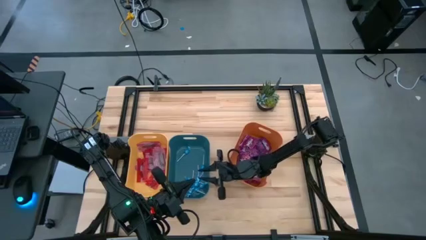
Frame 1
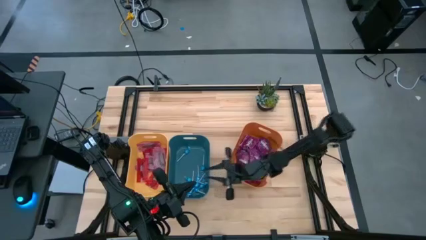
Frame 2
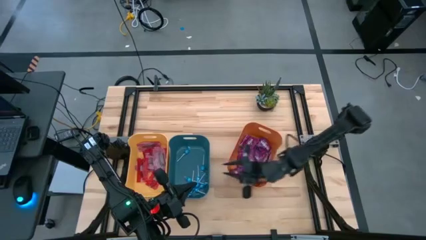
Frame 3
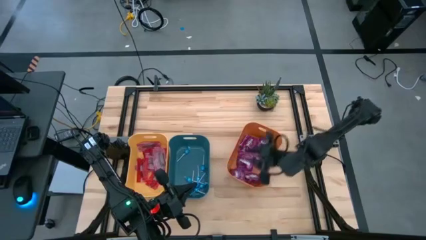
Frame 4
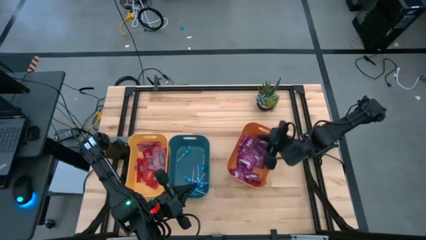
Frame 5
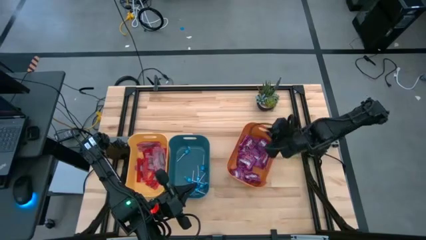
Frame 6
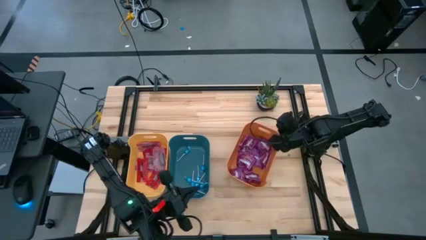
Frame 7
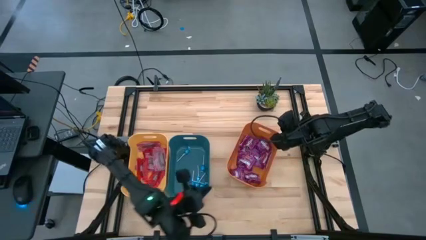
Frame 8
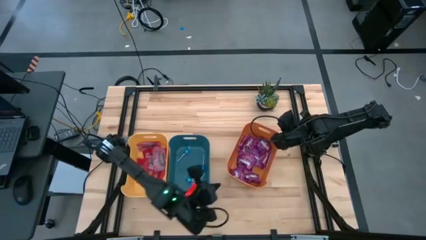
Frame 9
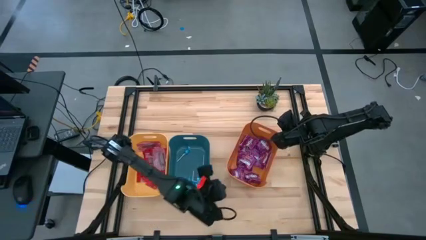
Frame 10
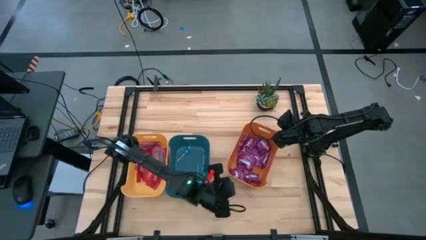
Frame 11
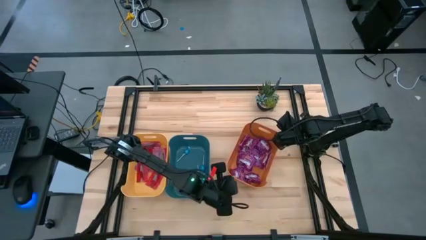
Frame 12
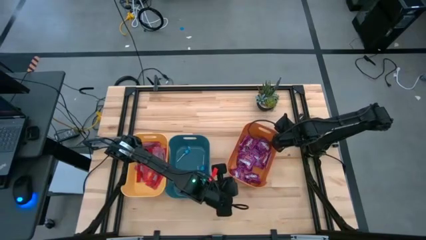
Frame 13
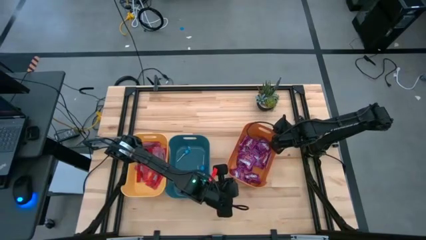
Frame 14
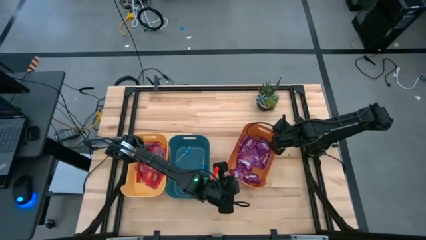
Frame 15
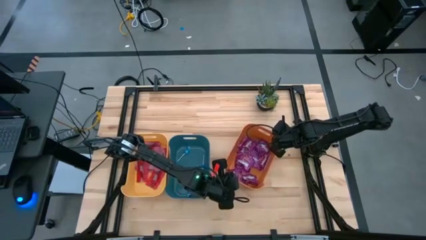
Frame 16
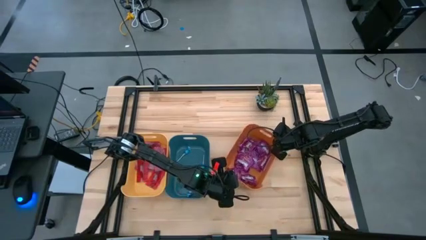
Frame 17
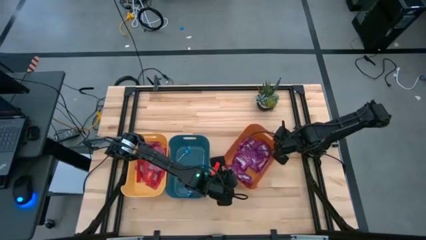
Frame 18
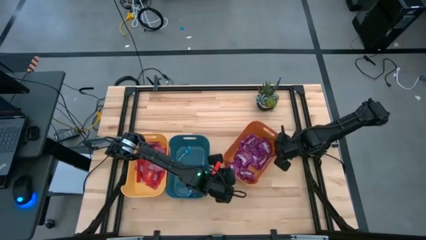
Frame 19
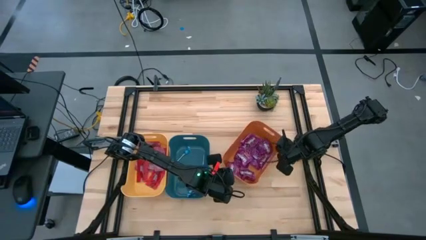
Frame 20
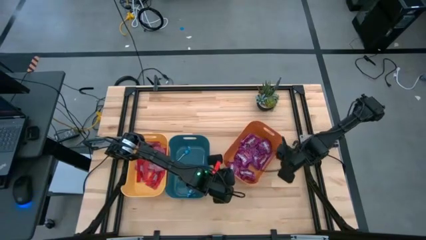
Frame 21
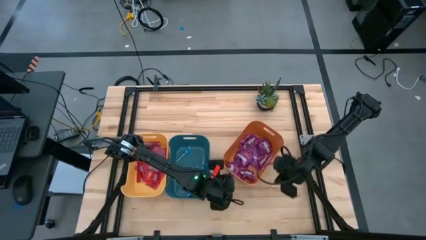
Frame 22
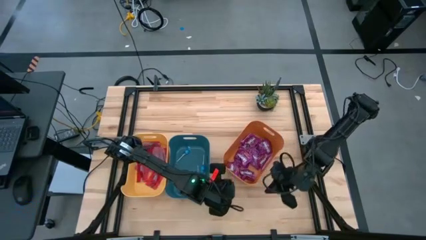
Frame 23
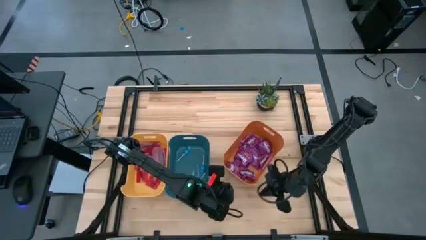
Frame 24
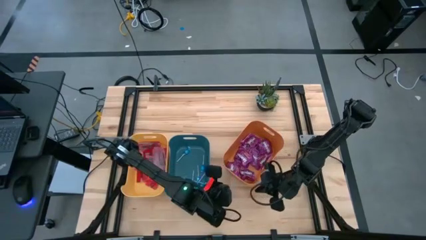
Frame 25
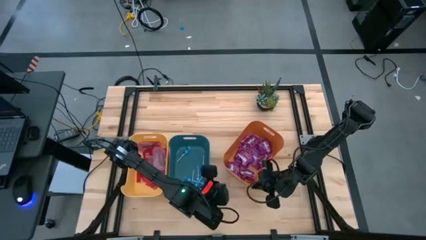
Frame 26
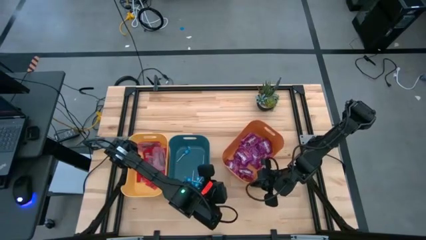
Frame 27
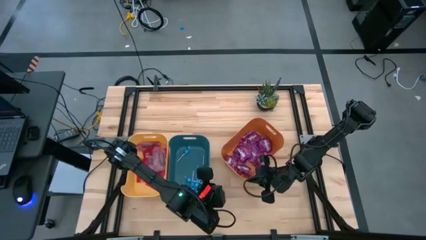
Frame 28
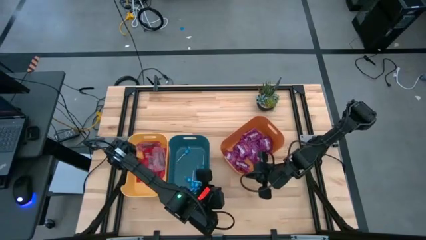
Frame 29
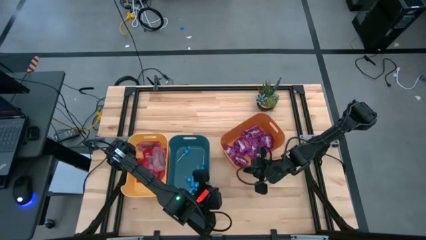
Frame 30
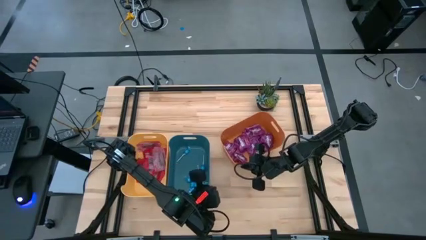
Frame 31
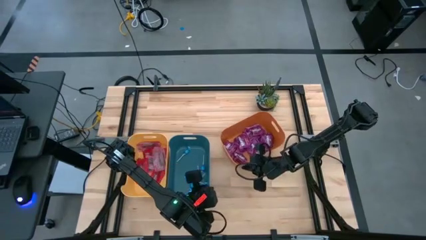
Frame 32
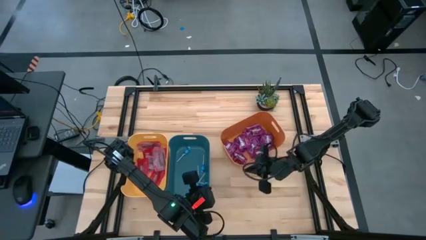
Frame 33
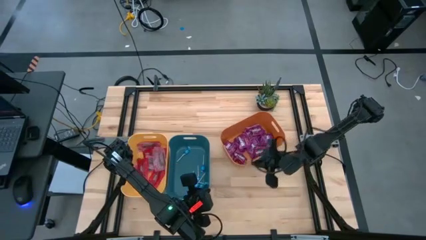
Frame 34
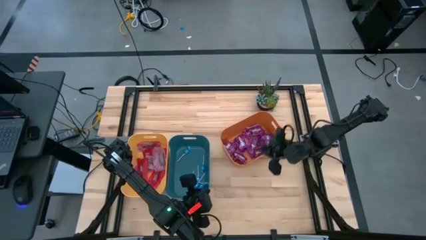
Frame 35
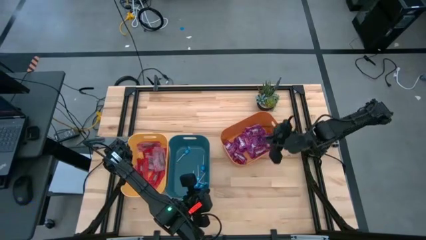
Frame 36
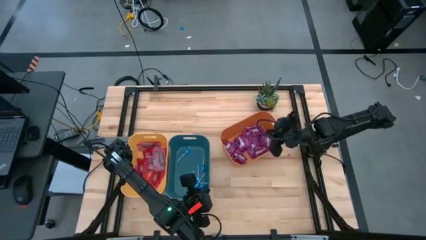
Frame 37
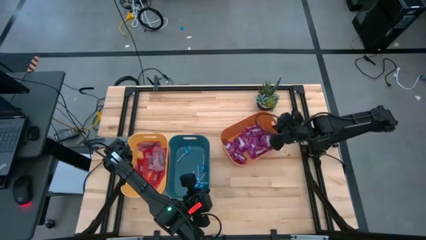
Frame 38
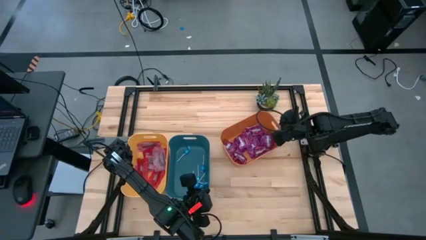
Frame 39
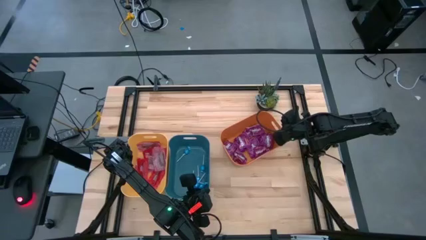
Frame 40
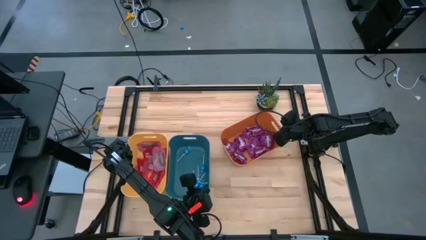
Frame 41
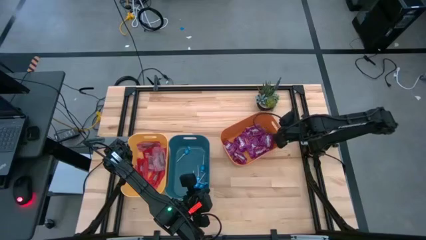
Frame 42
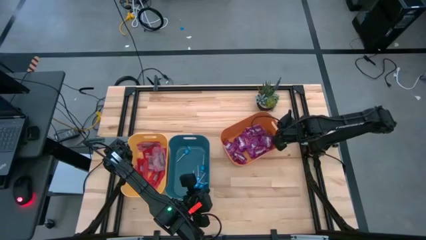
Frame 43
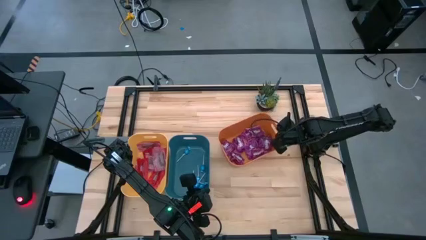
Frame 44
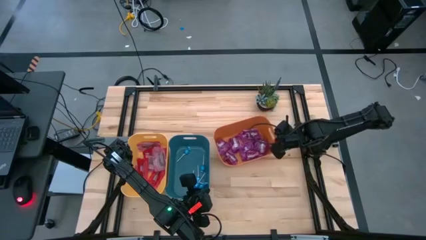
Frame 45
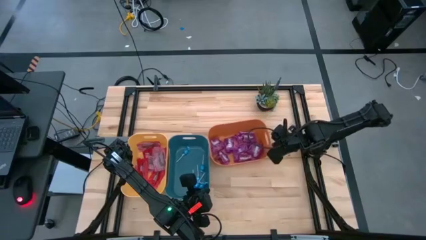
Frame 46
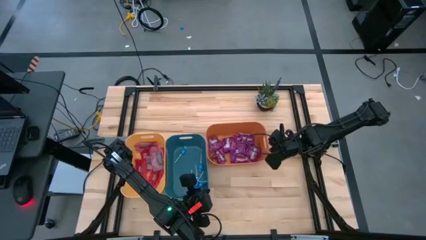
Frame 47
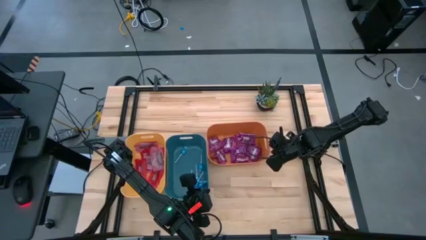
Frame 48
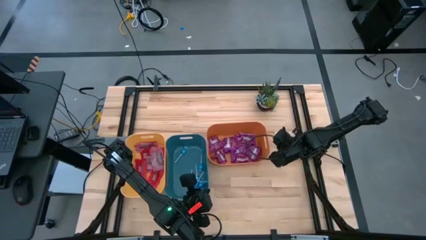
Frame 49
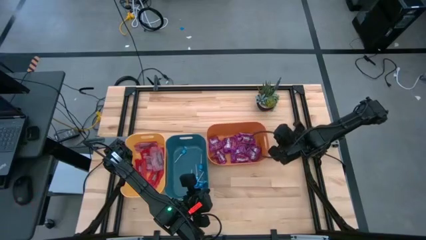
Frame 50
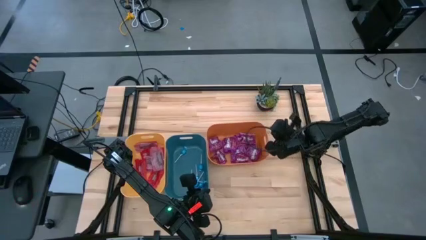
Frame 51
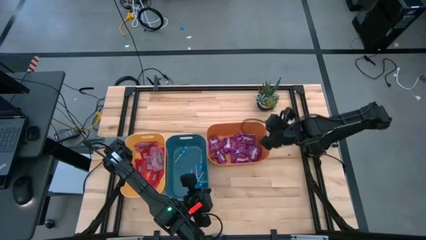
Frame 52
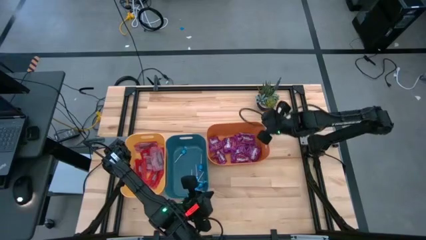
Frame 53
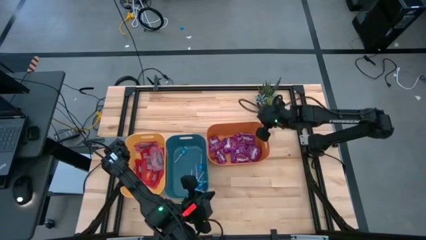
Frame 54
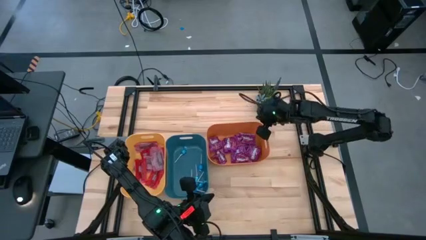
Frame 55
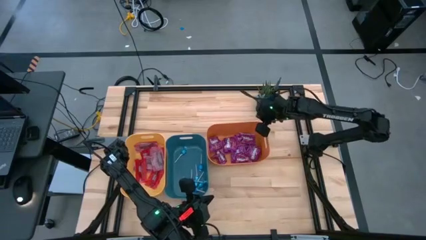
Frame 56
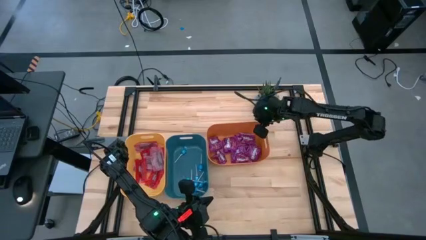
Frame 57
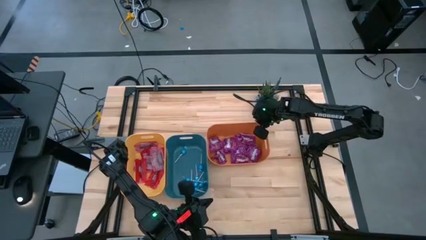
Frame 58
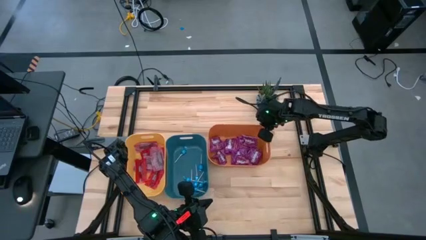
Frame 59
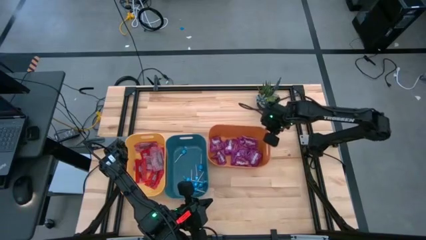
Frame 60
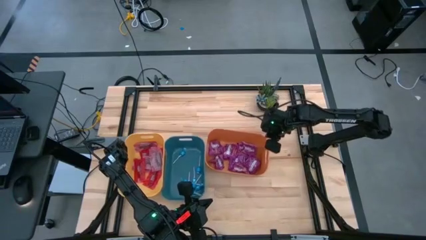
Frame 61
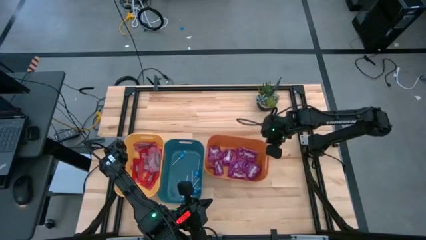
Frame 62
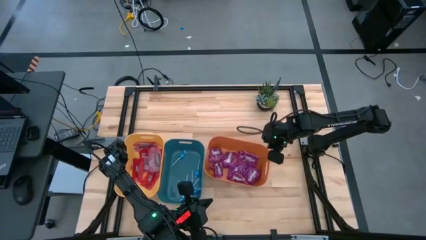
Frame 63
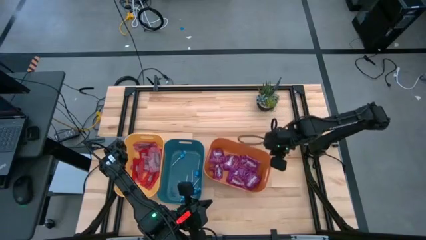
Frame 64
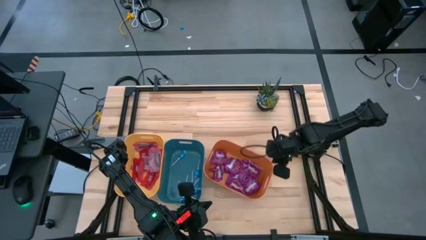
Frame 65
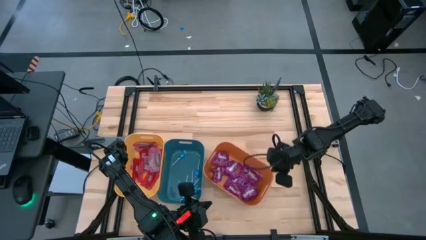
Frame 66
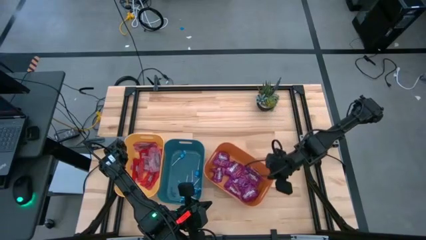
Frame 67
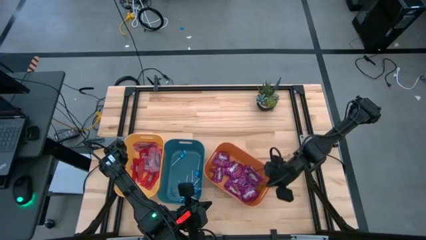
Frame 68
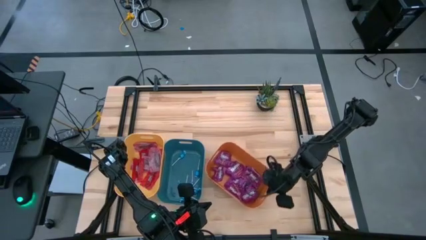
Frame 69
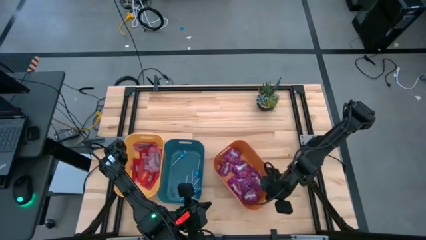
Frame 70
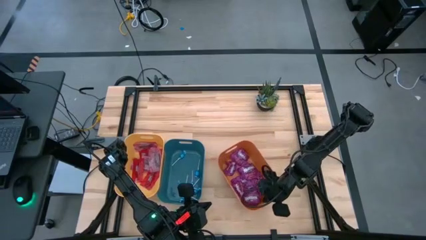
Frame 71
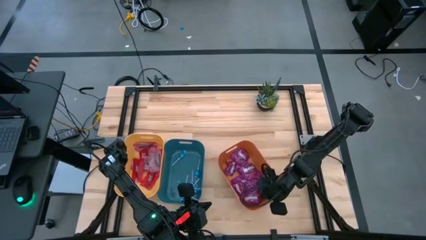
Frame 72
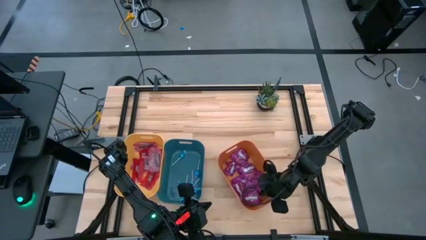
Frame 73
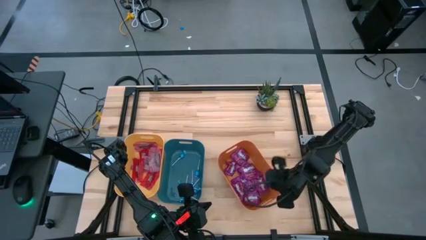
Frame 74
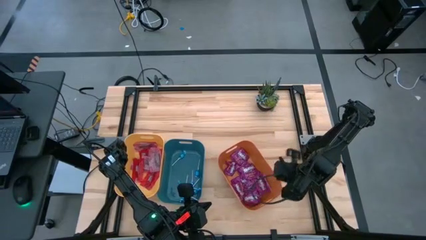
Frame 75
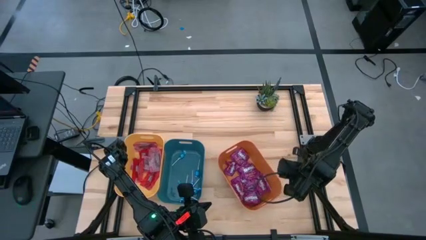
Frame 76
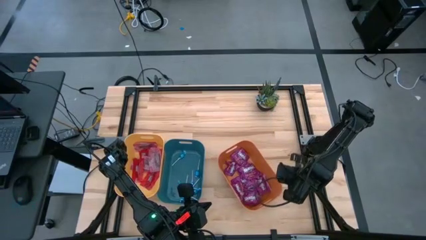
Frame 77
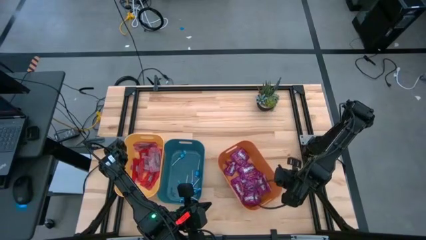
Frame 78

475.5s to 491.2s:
Task: Sort candy
Adjust the colored bins
